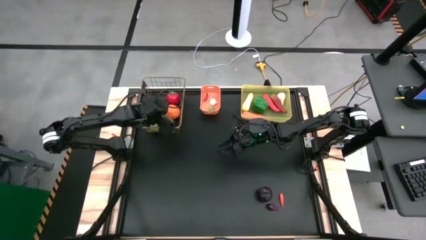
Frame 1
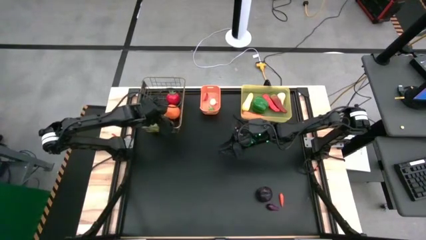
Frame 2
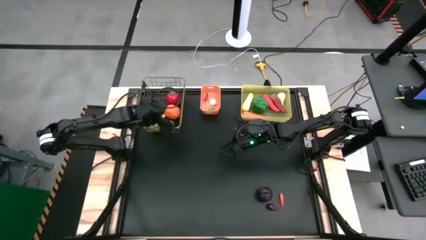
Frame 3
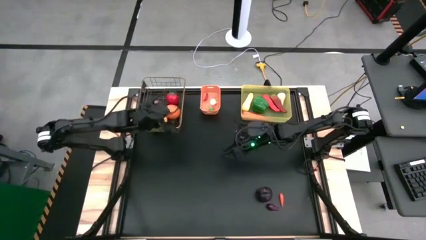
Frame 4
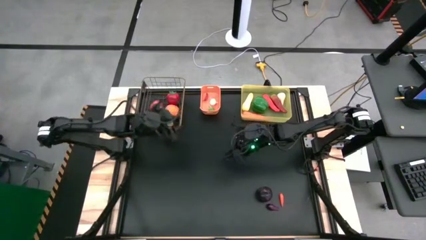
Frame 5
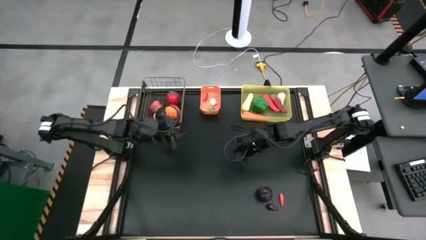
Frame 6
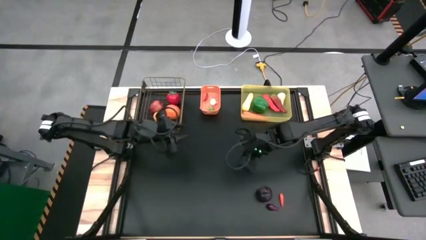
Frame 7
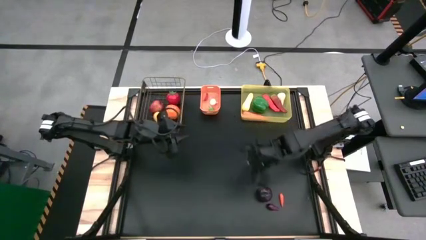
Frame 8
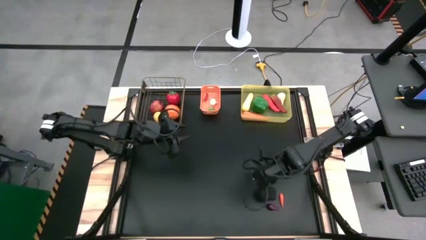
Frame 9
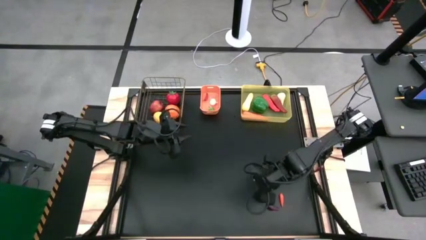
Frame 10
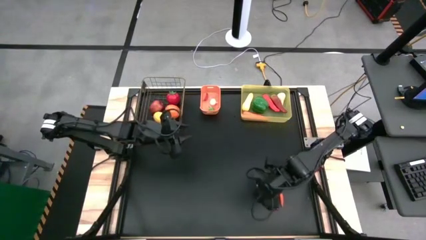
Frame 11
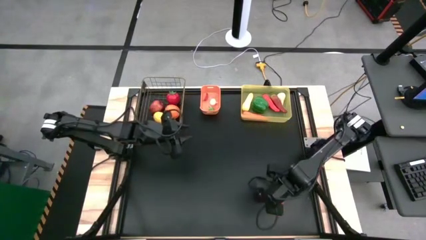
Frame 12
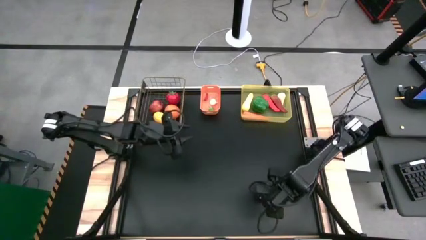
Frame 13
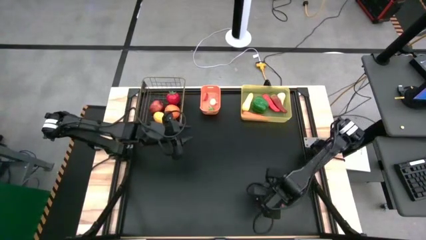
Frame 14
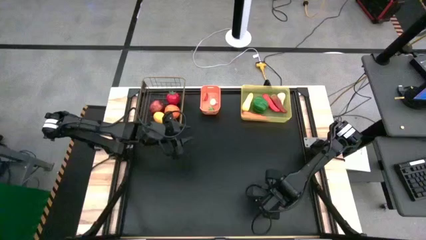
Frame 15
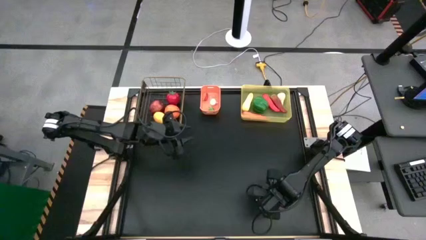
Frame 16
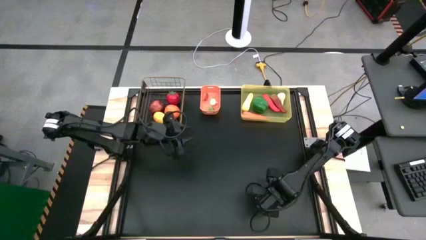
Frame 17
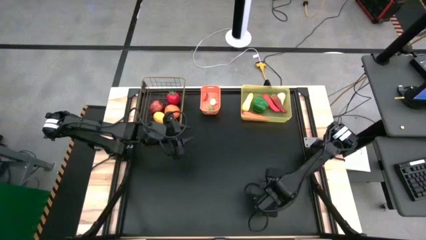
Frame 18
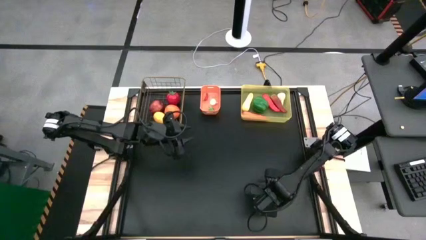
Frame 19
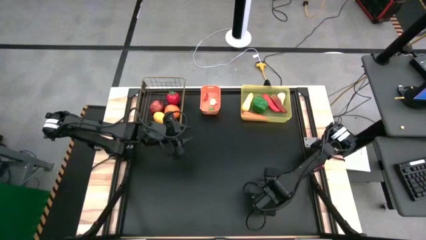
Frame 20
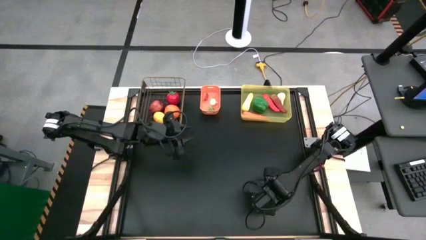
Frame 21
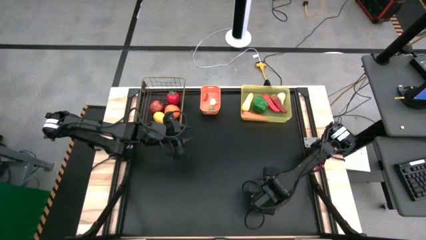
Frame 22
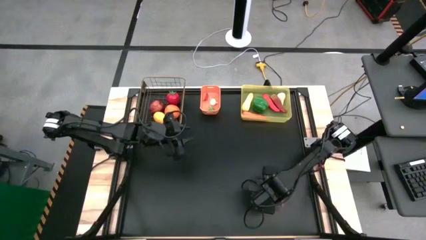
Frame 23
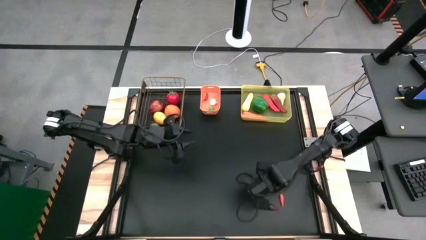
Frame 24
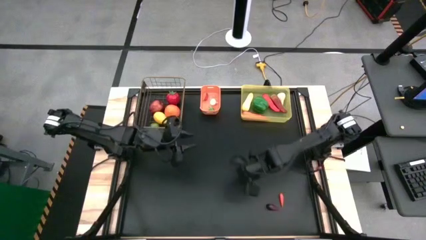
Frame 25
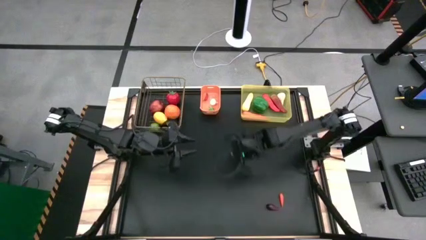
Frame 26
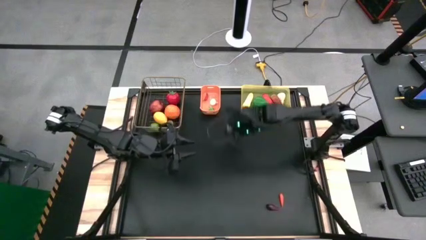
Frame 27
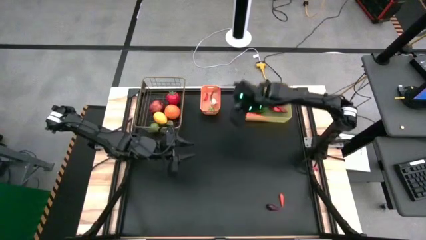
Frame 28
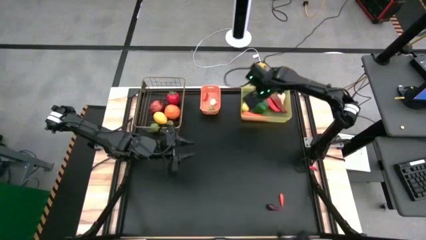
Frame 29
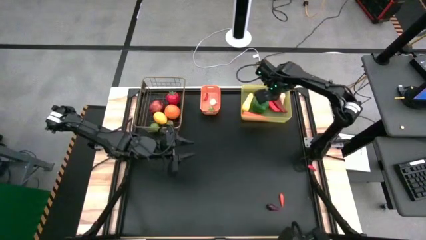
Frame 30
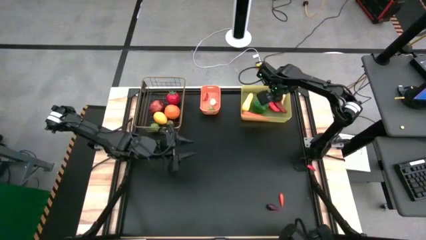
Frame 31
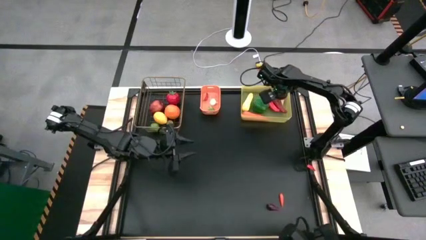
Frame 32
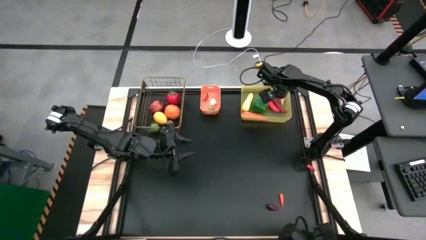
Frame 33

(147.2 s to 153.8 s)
Task: Sort produce into baskets
Put the purple onion into the yellow bin

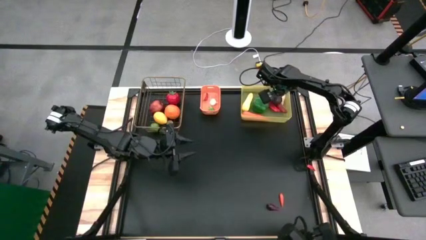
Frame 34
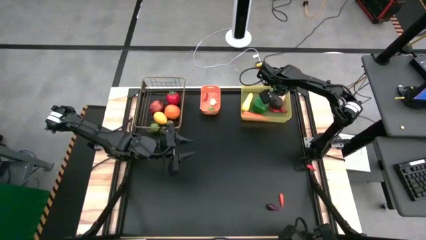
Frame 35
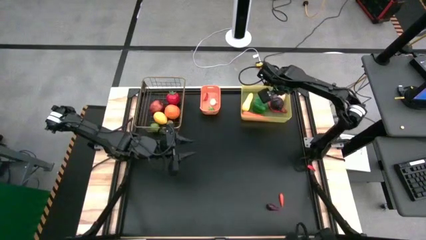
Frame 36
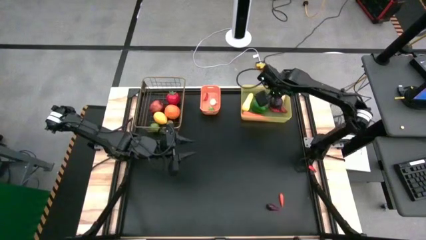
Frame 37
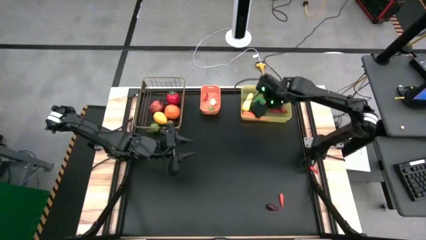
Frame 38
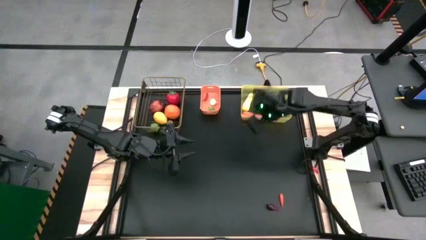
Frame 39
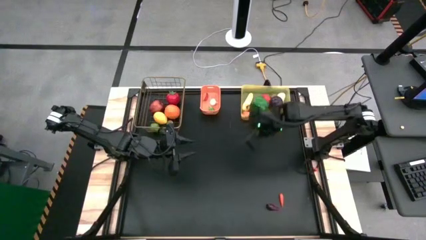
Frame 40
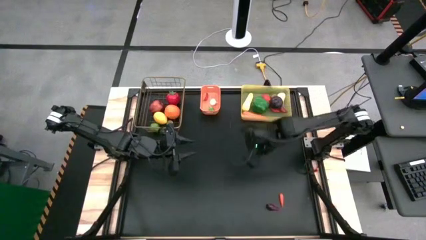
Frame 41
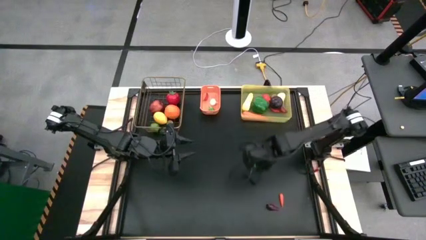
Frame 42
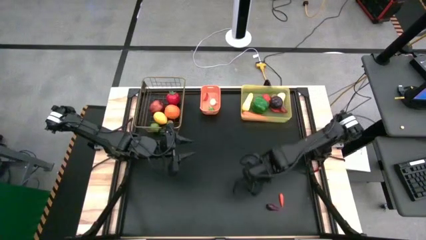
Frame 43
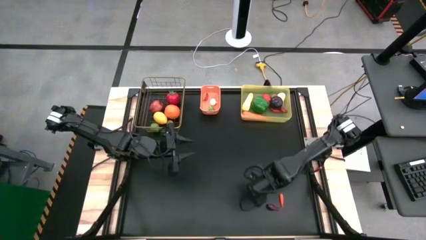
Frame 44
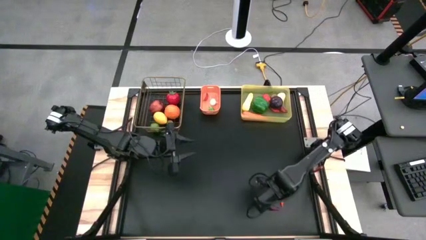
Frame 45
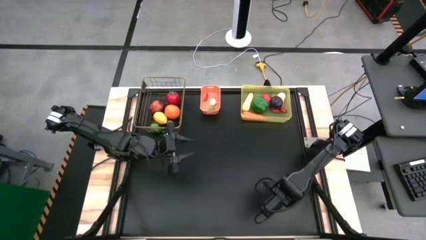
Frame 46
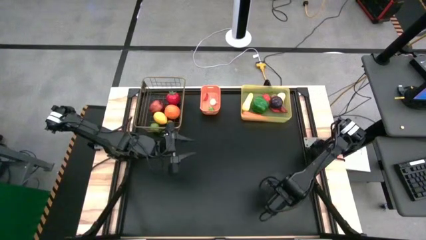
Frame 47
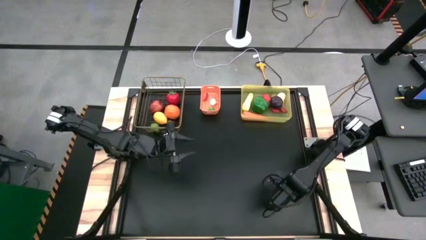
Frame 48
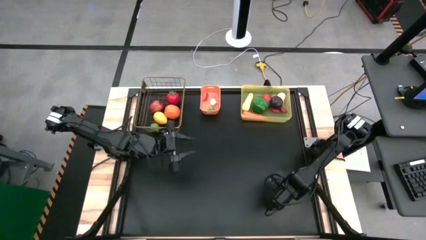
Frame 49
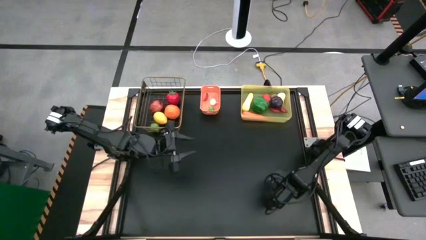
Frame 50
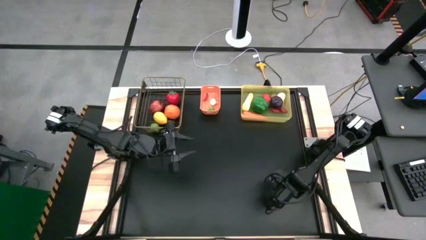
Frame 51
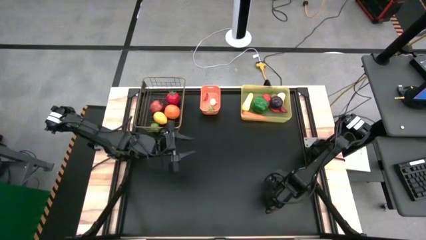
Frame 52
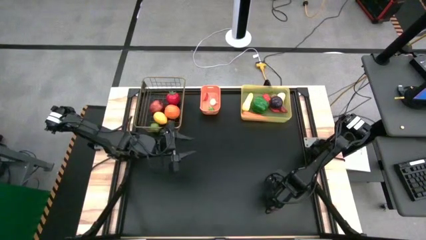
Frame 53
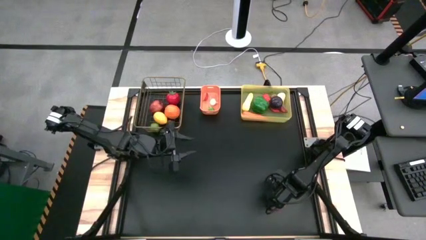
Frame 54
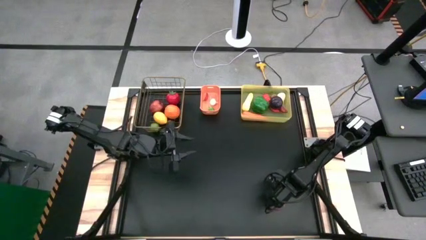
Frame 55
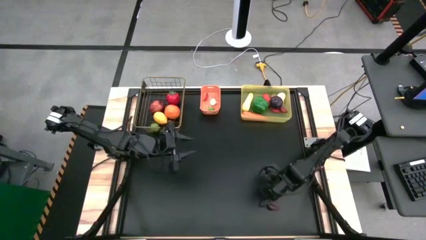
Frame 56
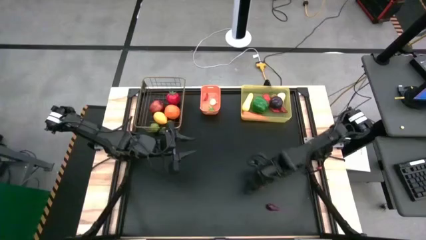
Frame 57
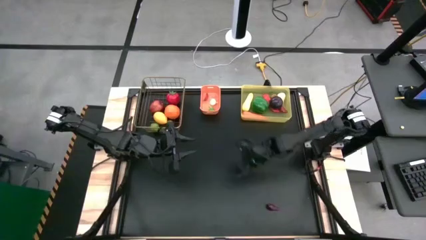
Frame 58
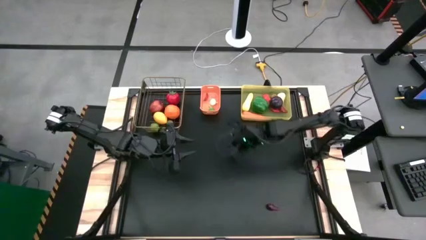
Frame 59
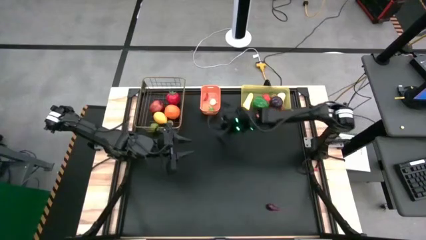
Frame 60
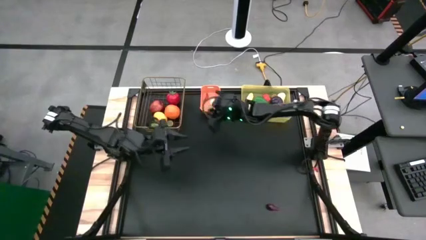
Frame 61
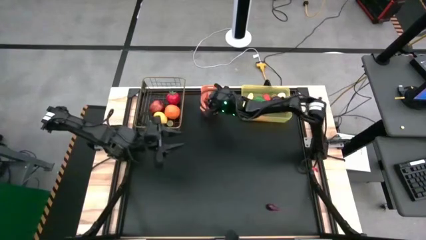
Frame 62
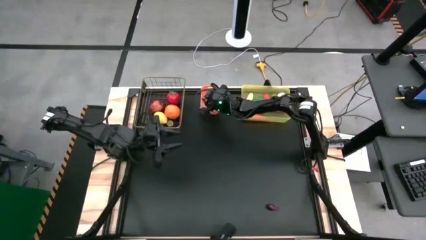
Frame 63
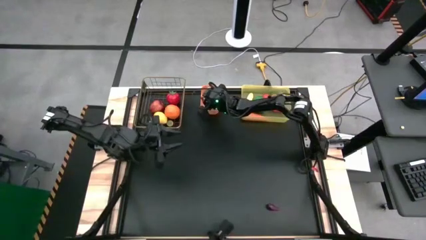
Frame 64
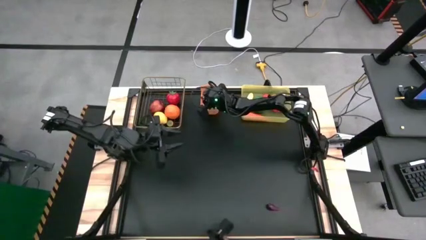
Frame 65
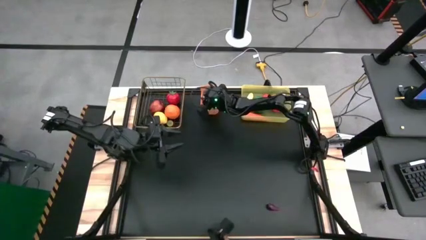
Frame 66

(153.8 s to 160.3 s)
Put the orange chili pepper into the orange bin

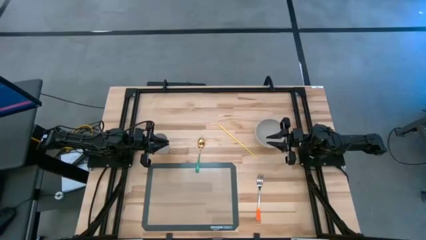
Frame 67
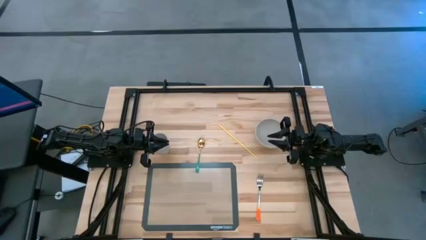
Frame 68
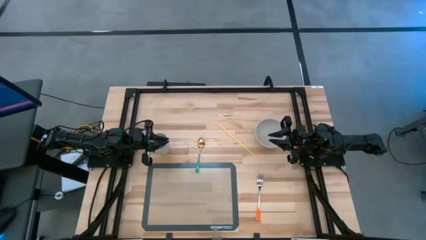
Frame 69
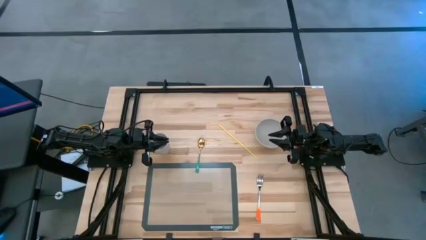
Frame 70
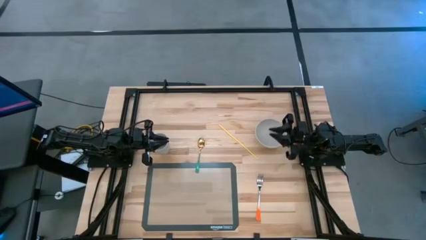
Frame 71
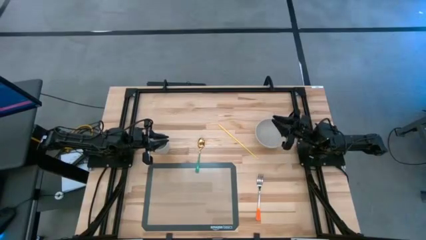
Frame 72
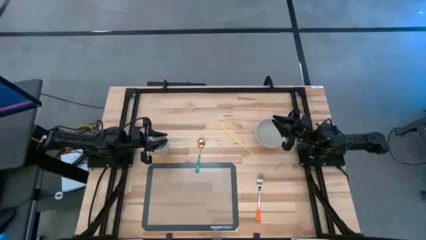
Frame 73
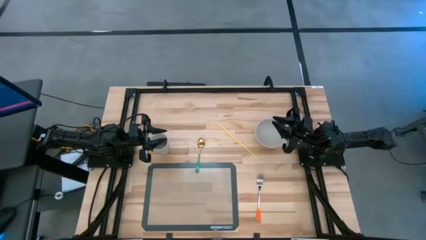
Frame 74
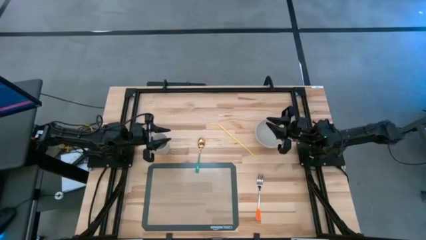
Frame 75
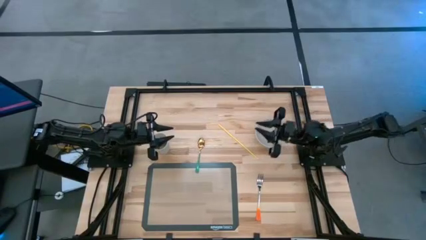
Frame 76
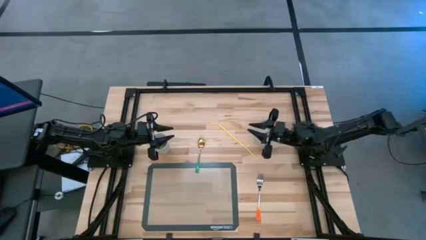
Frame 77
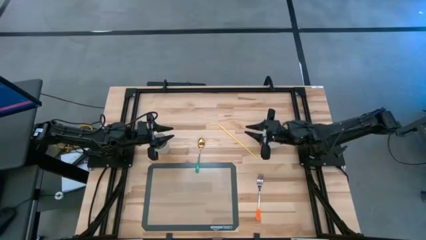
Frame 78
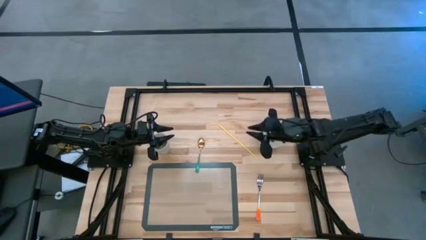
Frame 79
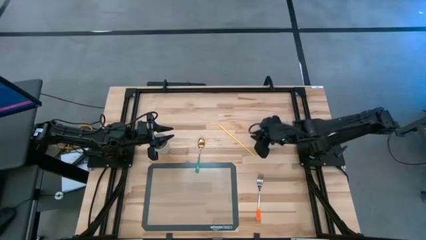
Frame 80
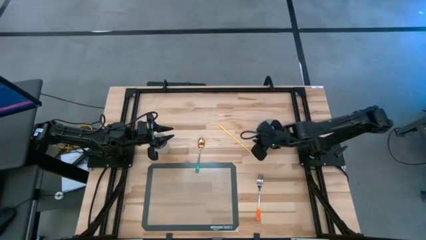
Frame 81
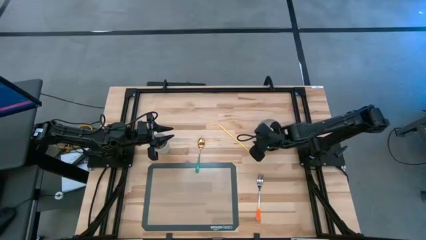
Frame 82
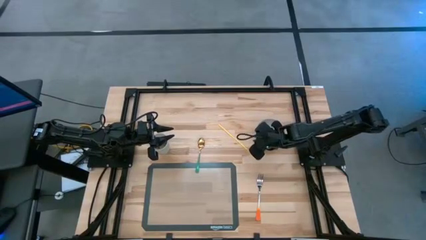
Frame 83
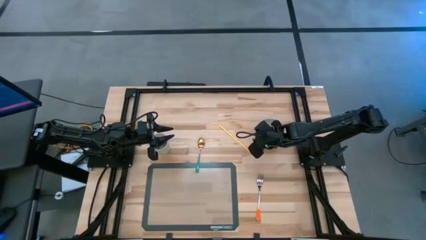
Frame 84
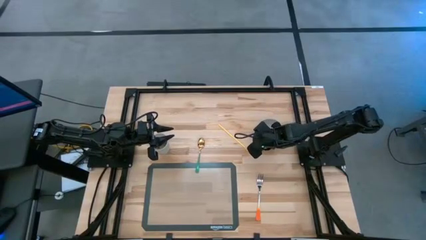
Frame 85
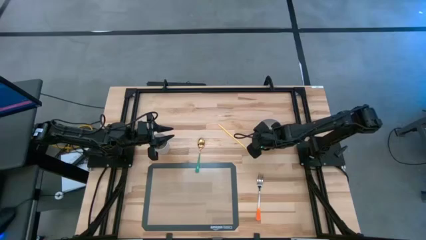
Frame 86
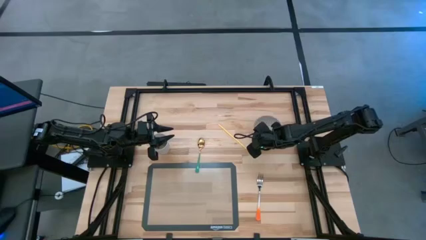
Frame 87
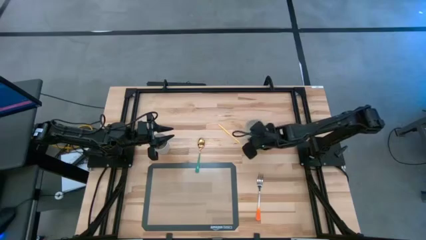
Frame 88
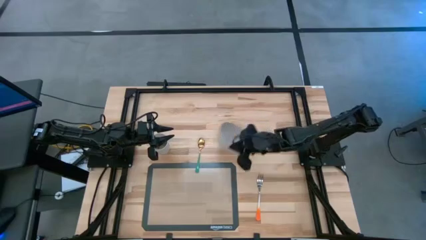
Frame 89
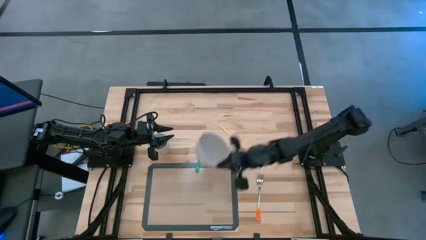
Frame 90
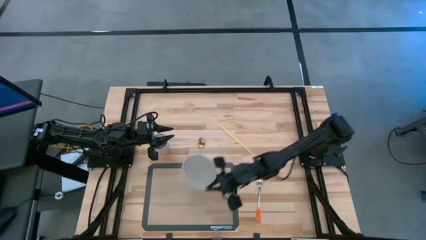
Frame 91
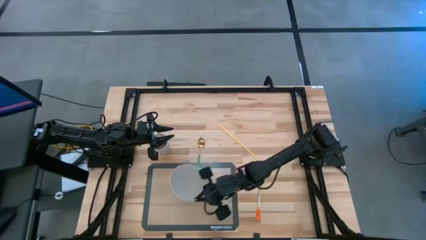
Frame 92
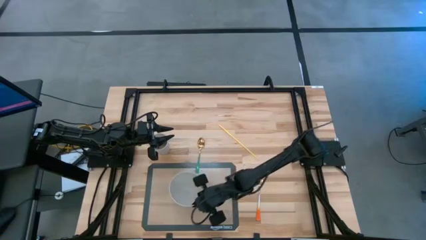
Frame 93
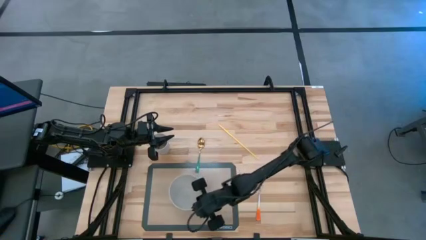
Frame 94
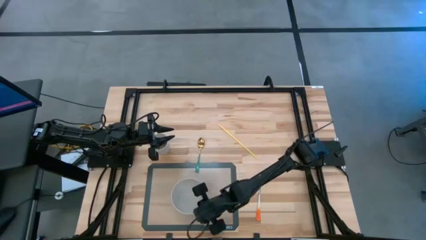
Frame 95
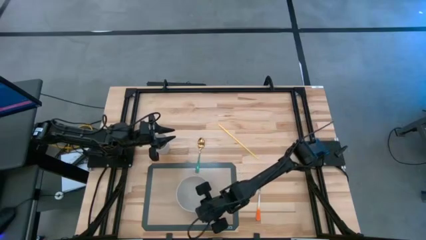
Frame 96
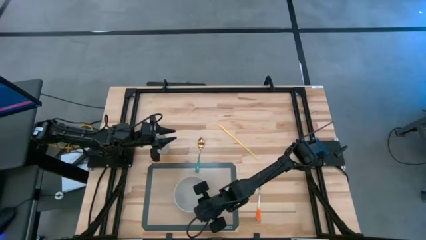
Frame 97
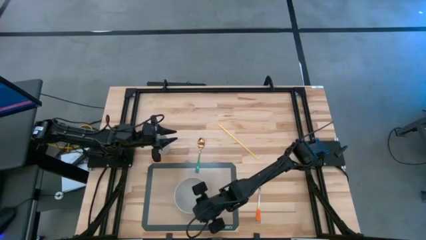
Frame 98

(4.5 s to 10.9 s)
Task: Pick & Place Utensil
Put the white bowl on the transparent mat
